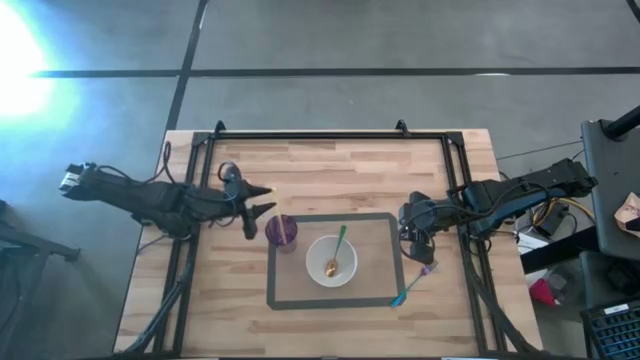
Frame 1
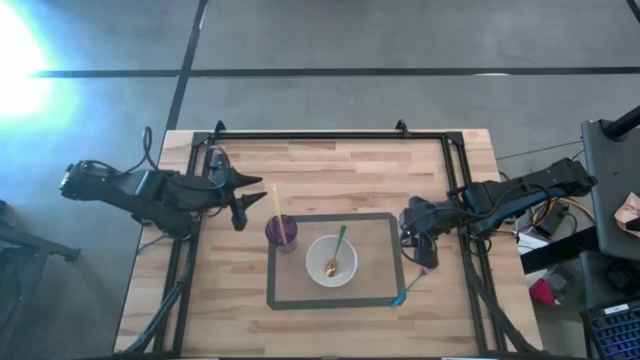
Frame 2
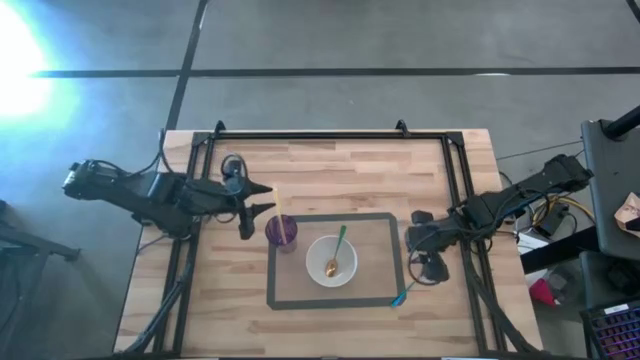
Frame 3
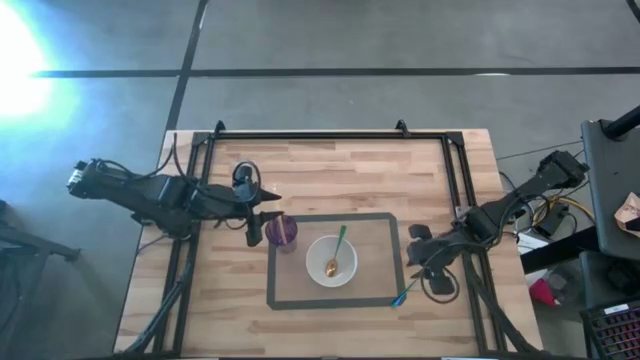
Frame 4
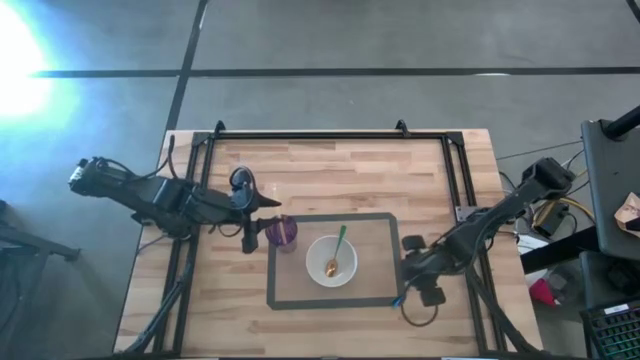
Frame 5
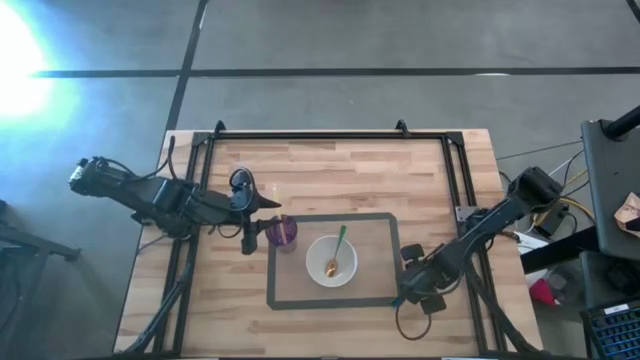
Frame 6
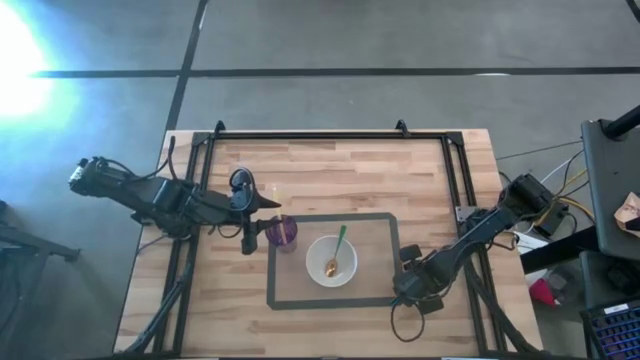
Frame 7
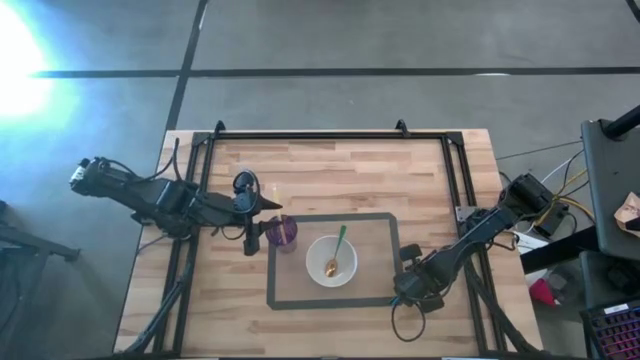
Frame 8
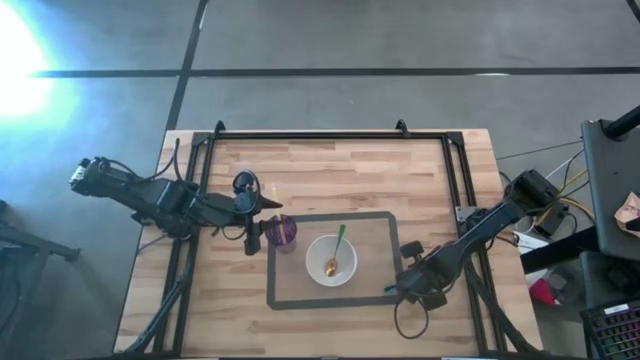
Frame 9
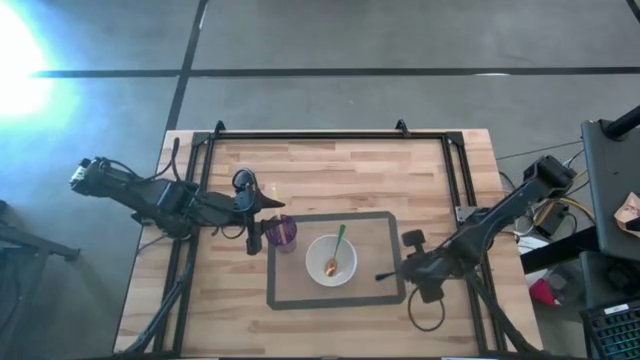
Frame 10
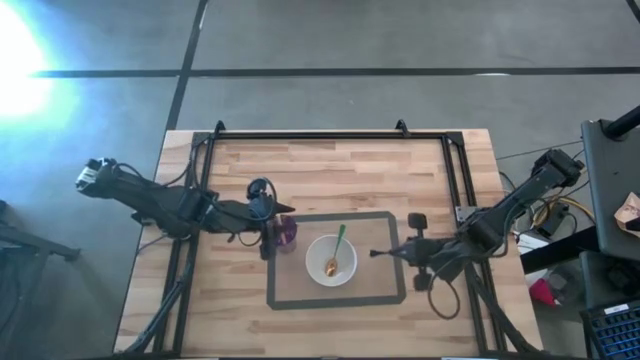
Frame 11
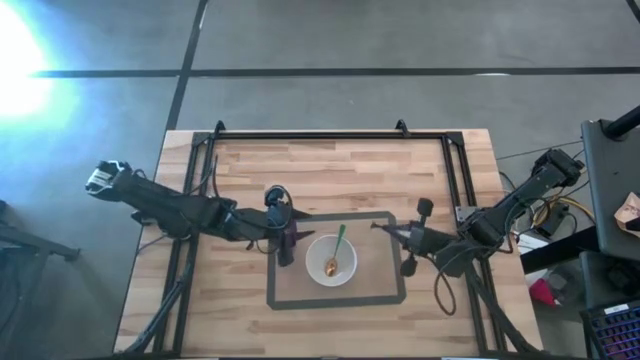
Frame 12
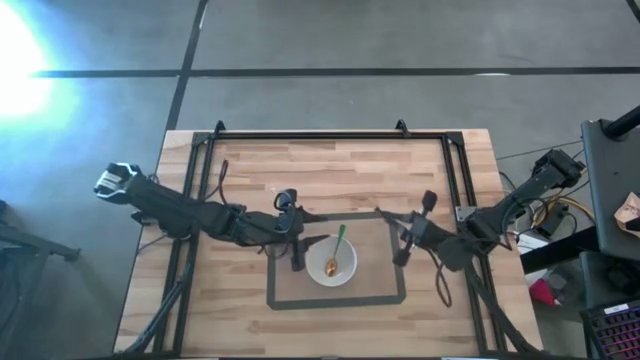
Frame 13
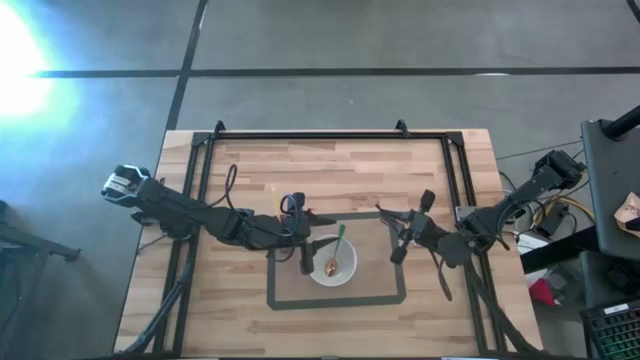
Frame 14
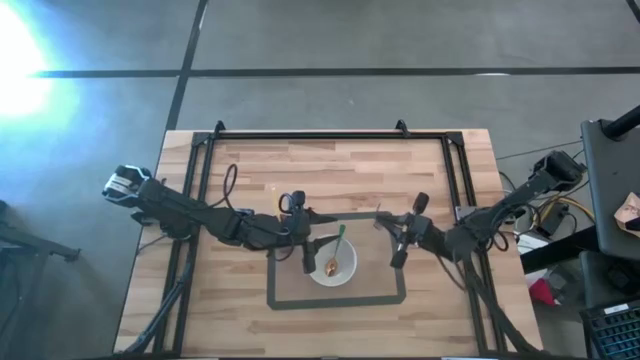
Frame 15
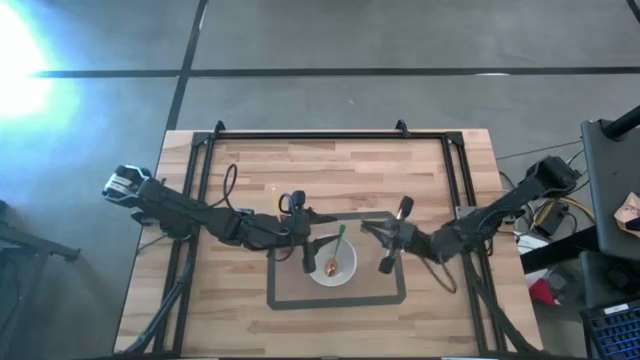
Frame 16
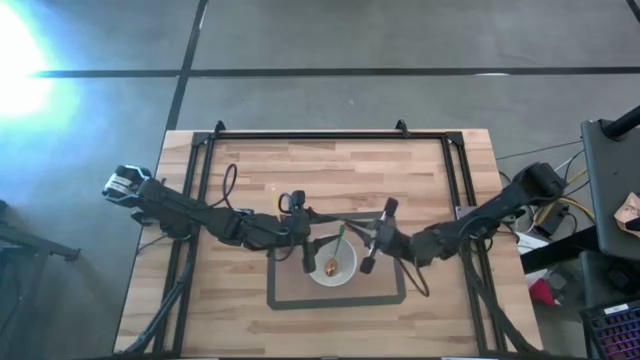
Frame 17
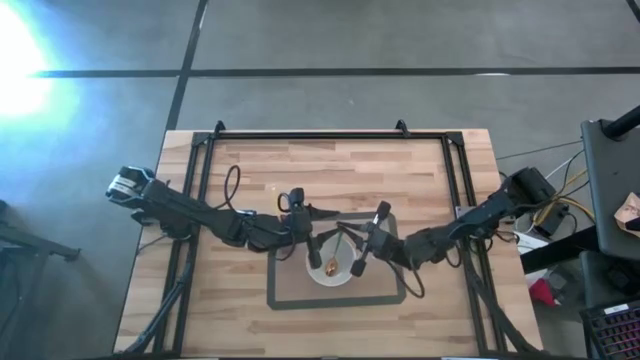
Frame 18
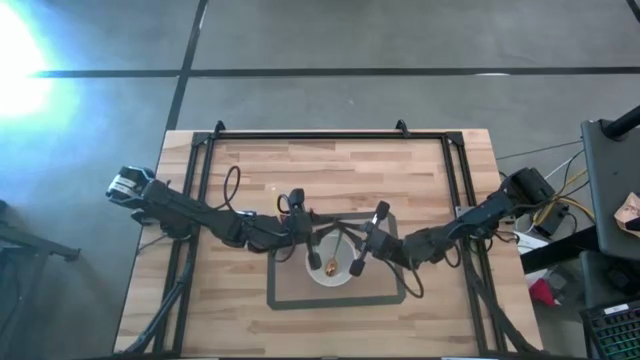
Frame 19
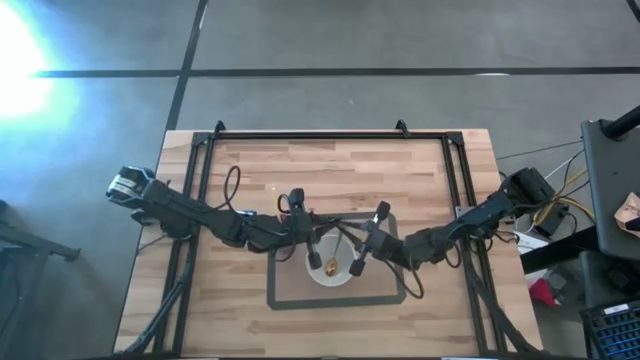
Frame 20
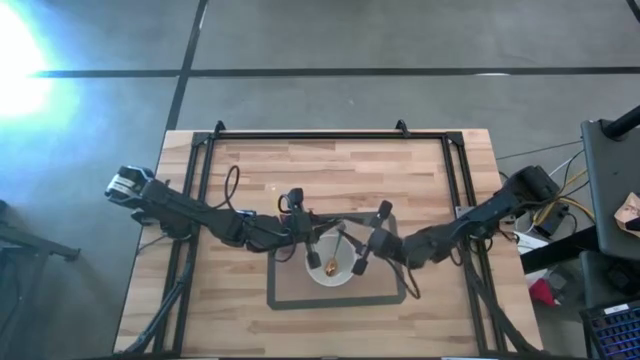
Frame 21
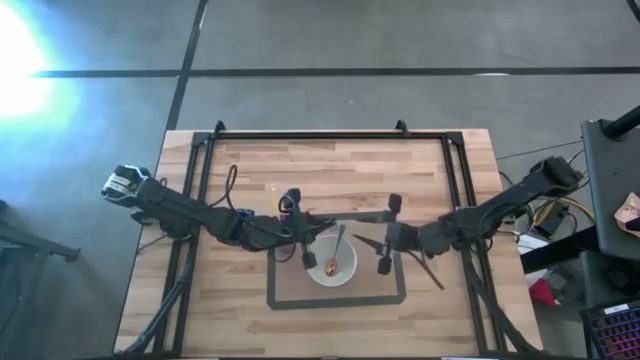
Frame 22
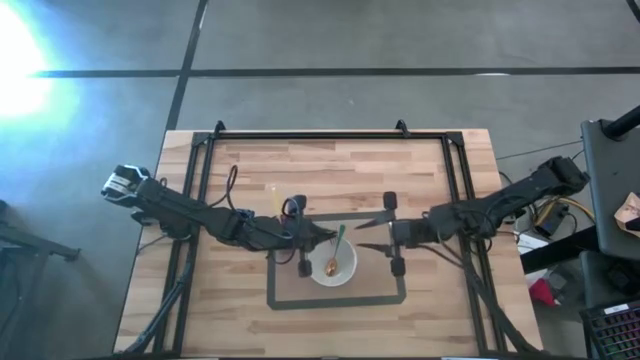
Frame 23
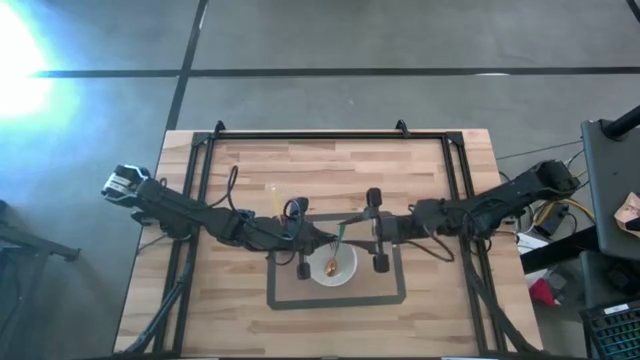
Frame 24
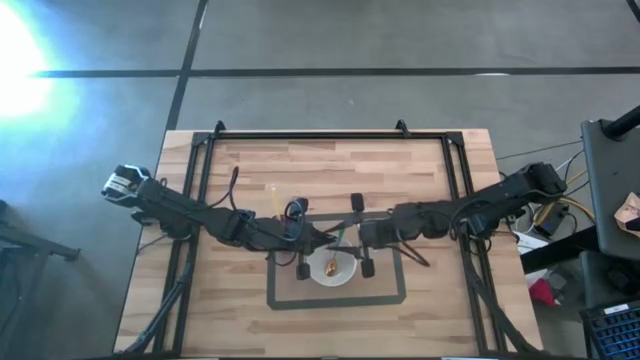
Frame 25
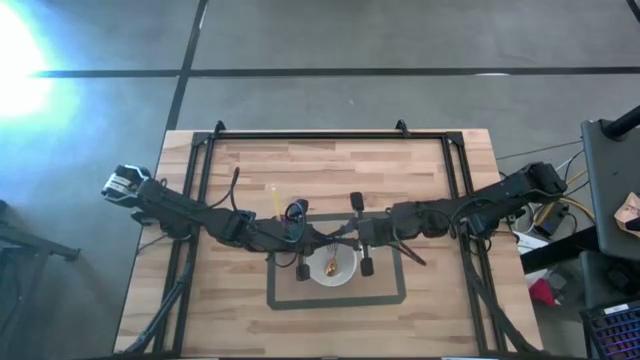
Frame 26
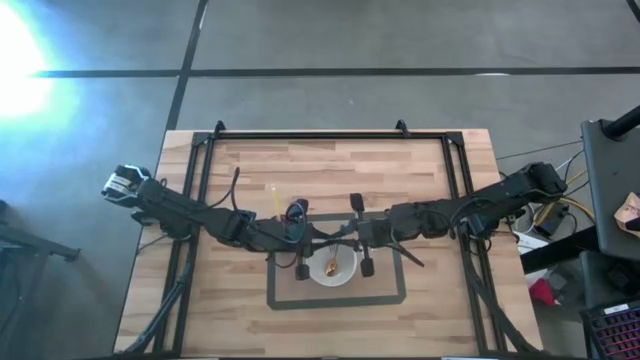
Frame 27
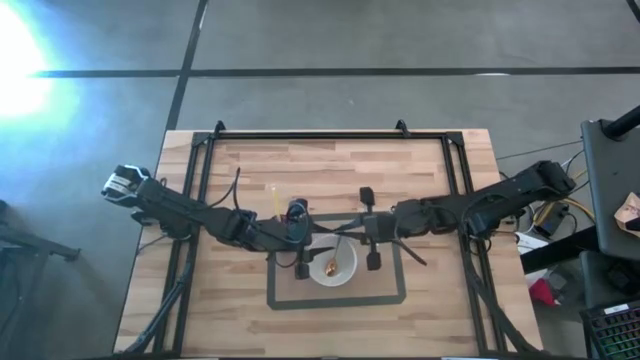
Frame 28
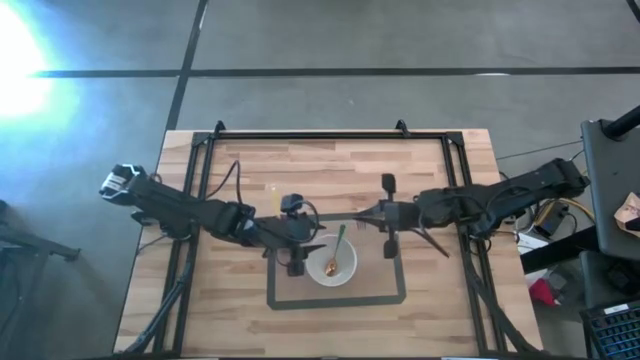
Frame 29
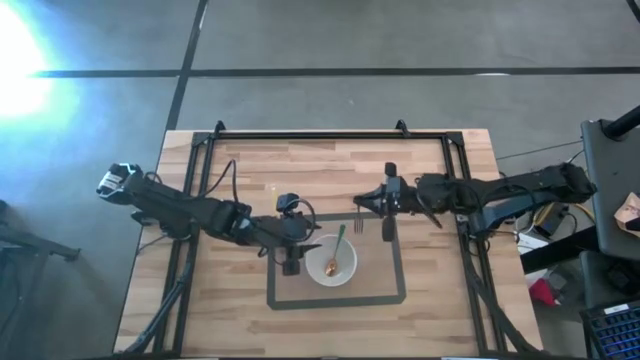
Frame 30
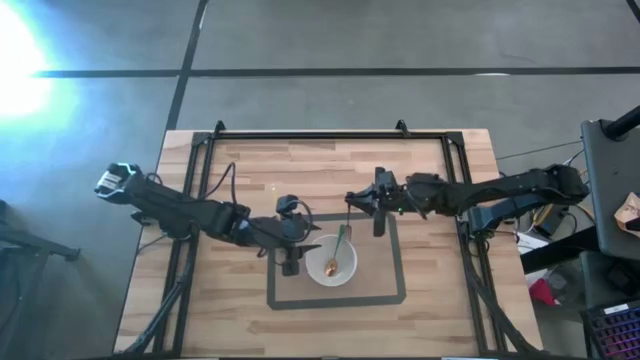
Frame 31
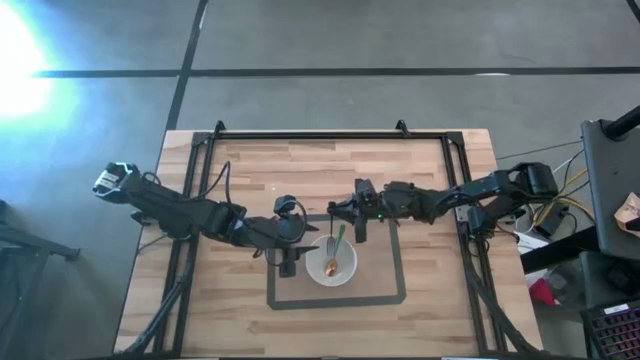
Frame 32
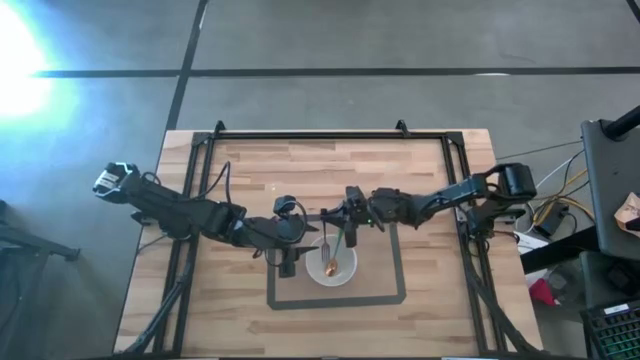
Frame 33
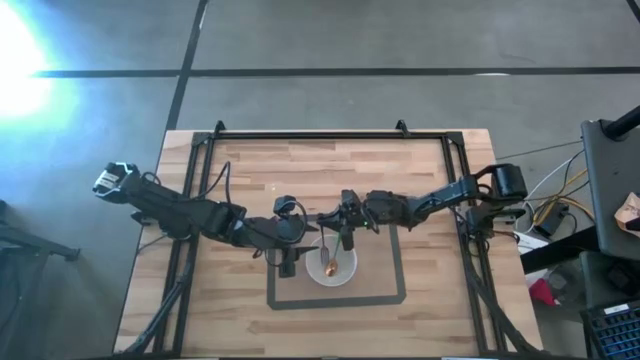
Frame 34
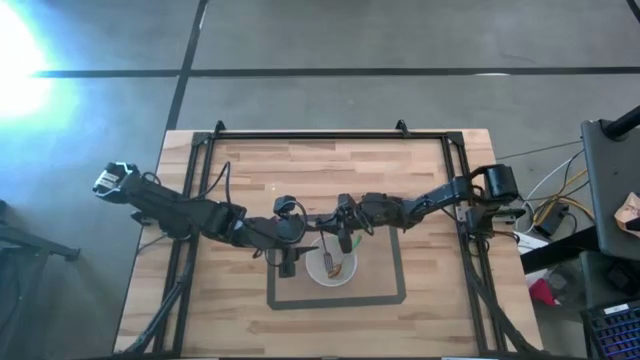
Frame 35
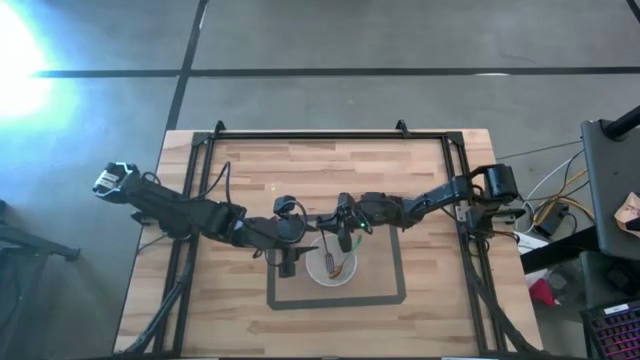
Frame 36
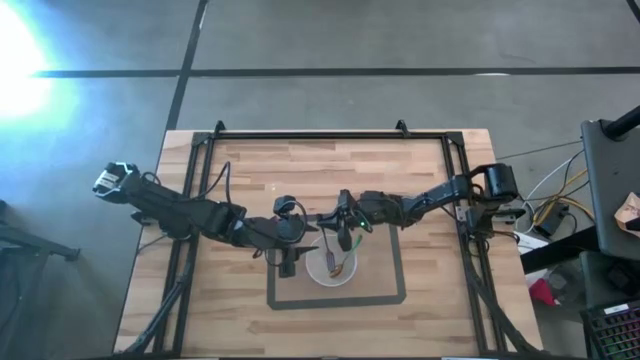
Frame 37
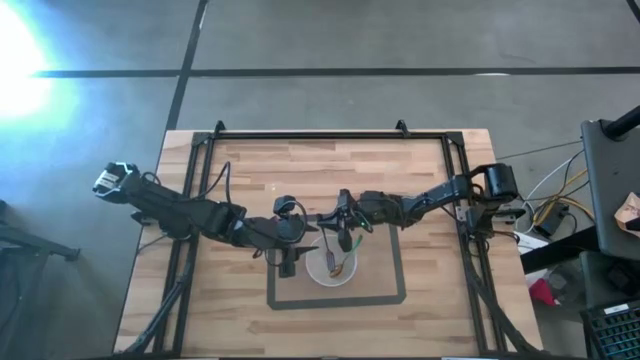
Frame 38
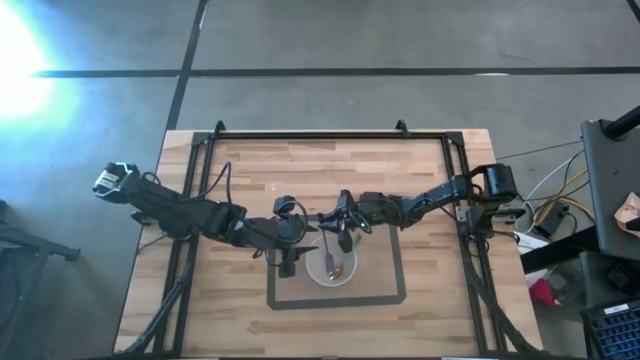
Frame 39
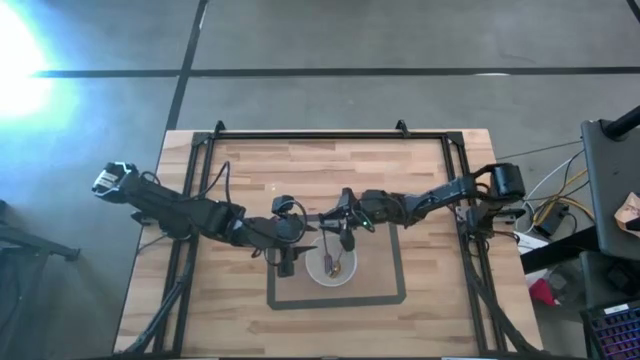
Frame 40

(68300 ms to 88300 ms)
Task: Pick & Place Utensil
Put the blue fork into the white bowl

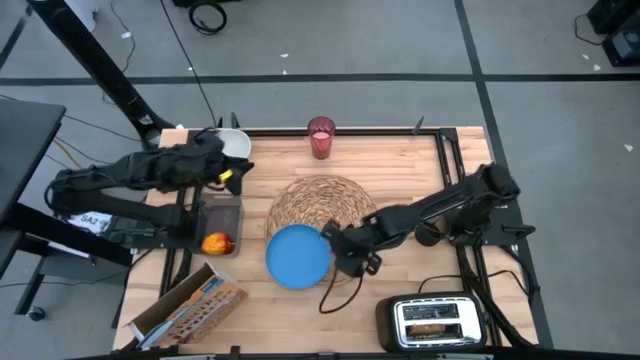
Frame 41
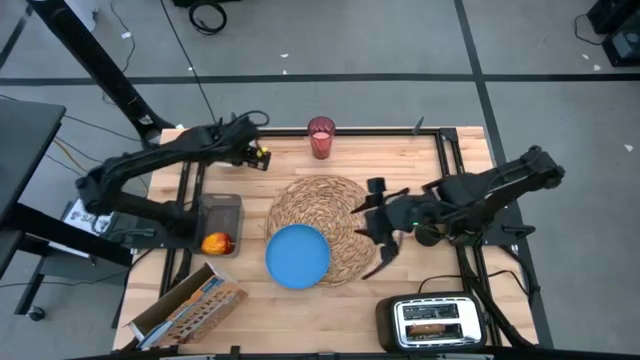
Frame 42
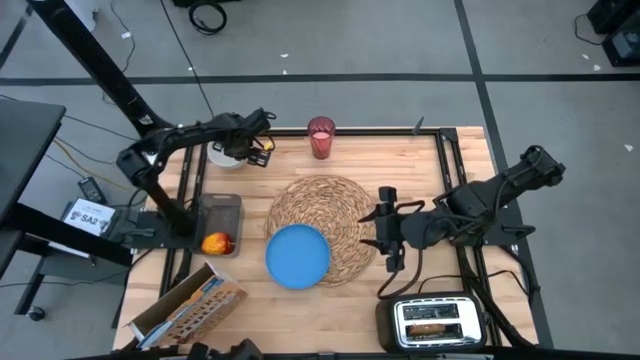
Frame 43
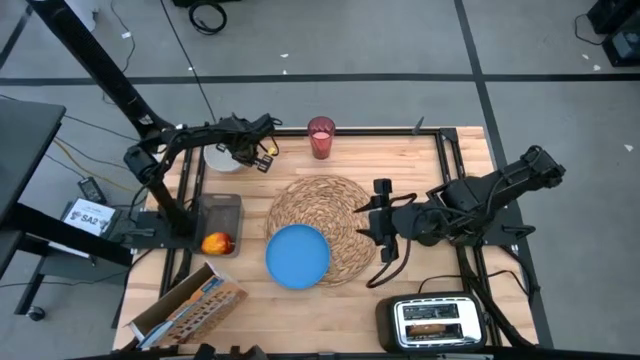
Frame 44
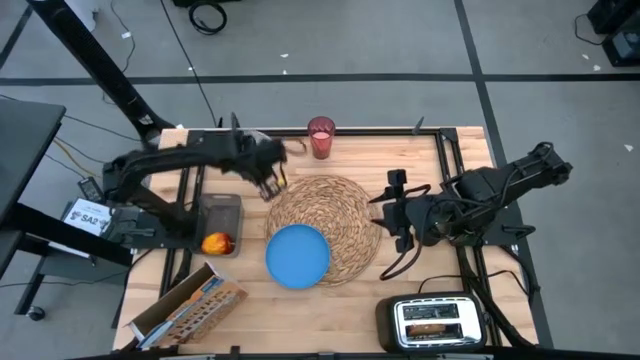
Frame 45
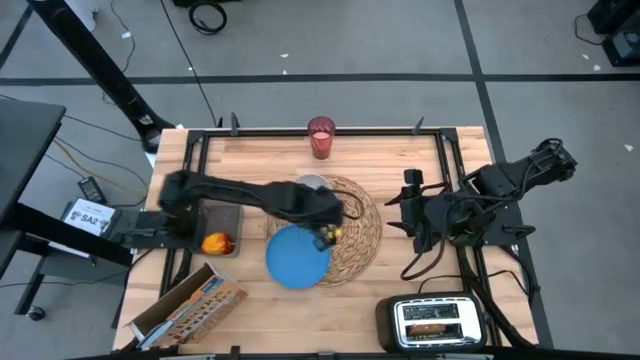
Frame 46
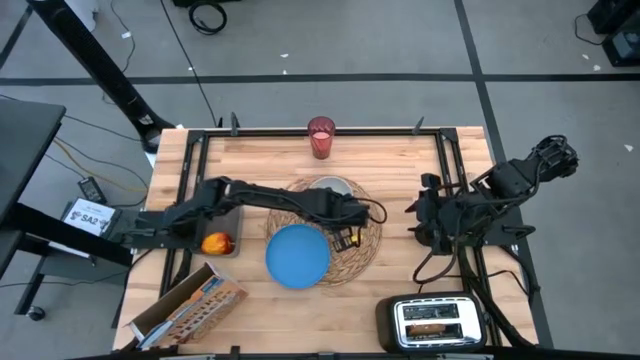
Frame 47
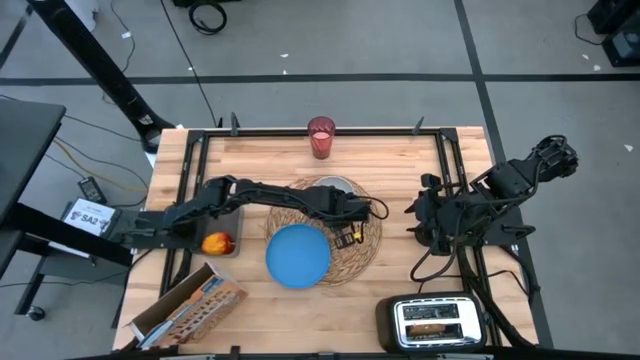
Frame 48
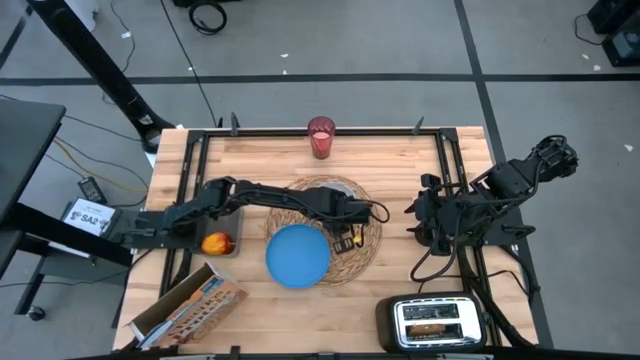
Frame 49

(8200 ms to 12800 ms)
Task: Arrange a breakfast setting
Put the bowl on the woven placemat
